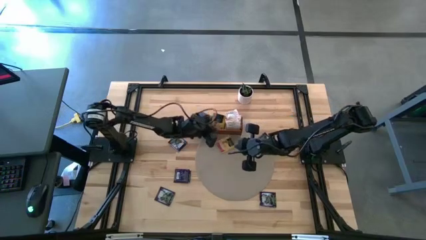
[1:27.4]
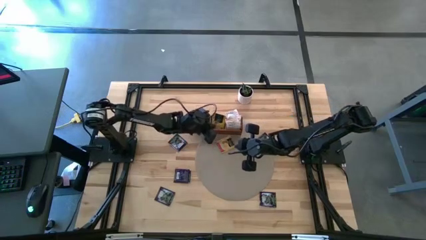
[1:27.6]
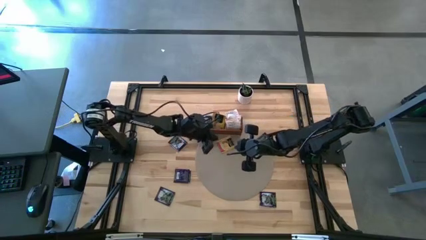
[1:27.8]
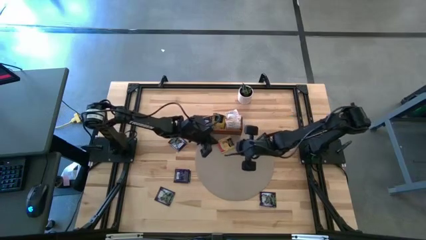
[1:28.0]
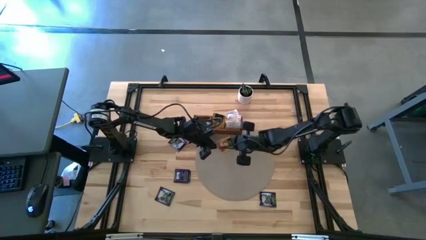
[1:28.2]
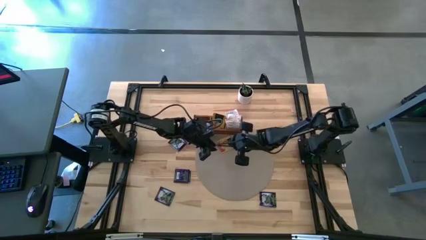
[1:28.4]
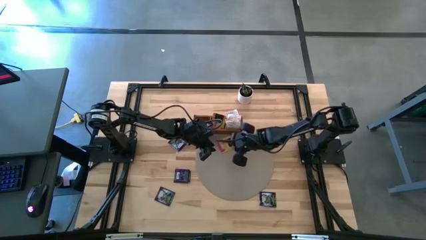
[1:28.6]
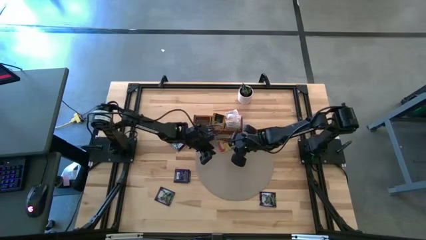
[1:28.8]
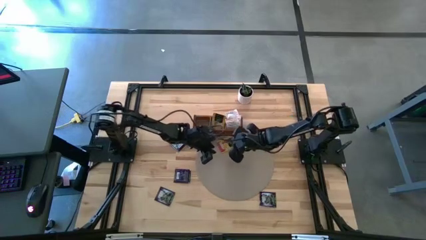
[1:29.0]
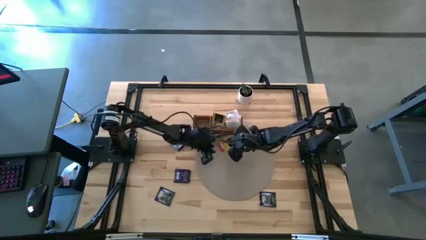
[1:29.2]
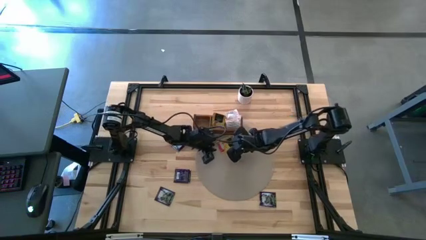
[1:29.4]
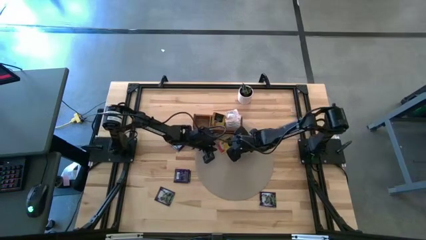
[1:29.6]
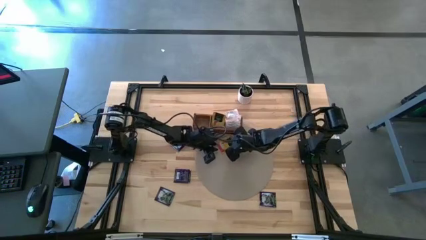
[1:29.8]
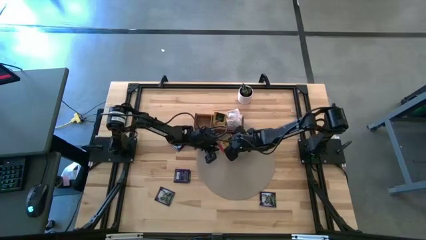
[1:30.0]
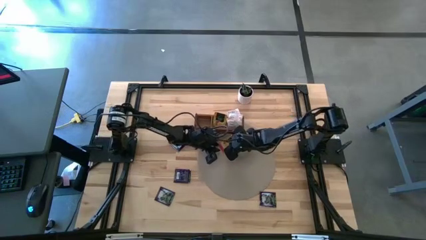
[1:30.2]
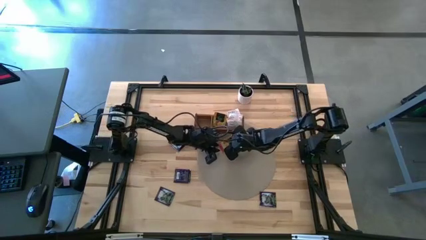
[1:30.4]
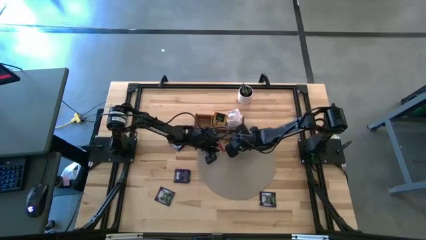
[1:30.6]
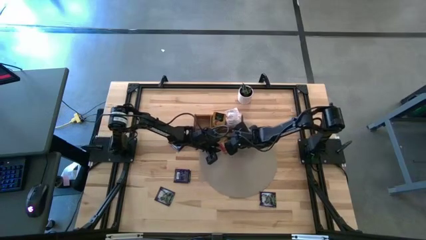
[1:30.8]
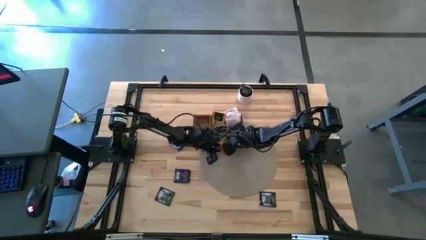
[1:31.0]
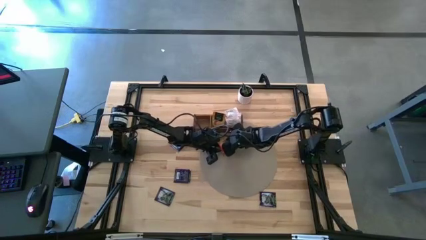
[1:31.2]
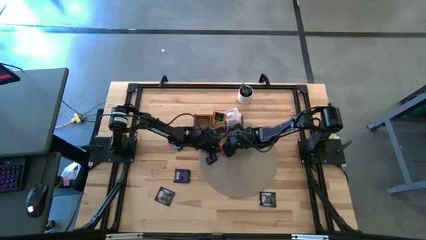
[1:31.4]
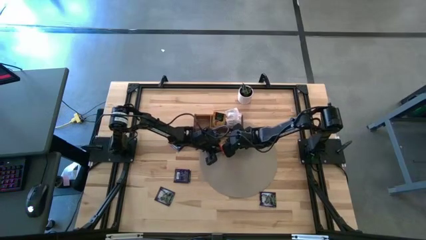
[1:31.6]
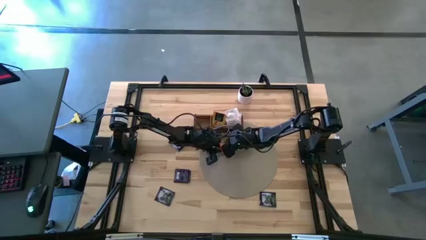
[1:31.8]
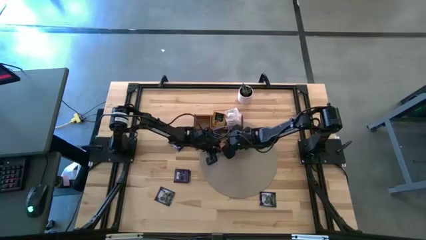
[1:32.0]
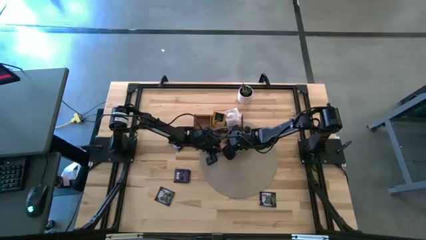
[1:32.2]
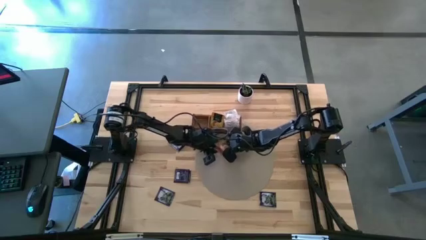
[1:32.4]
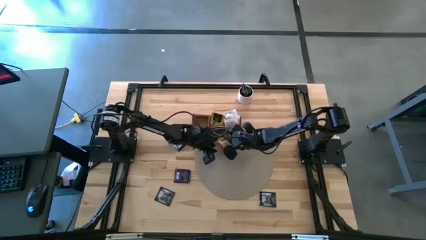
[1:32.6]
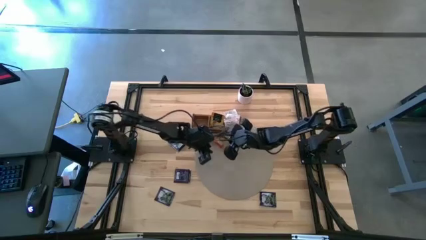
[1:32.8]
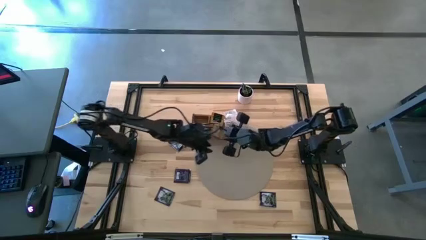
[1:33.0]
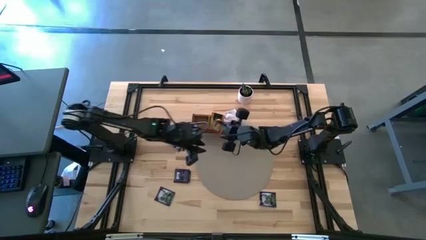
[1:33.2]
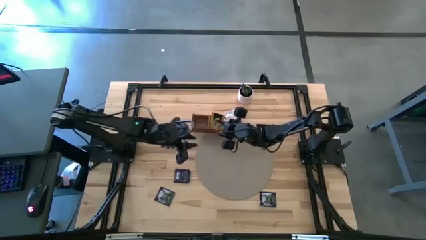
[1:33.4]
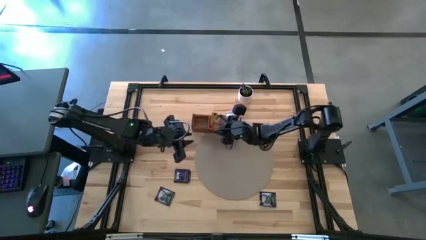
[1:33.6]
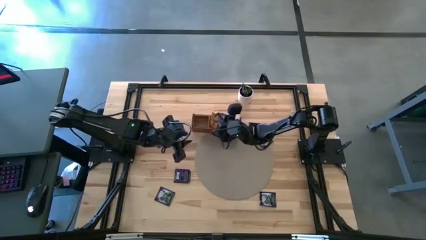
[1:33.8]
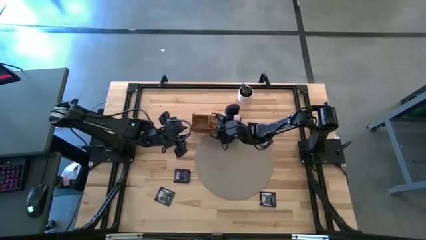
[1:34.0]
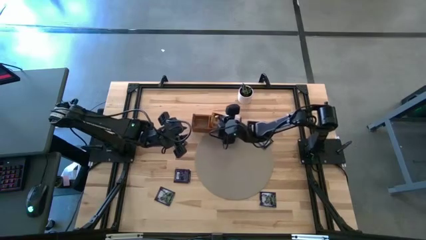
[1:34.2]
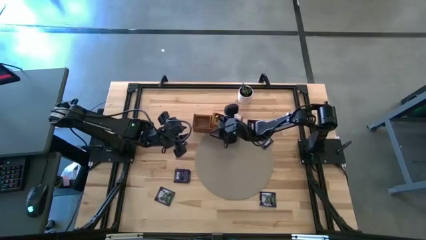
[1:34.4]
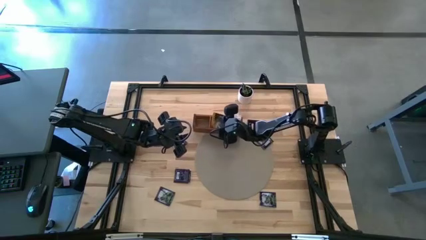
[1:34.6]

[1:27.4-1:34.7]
Task: Pick & Place Tea
Put the yellow tea bag into the middle section of the wooden organizer

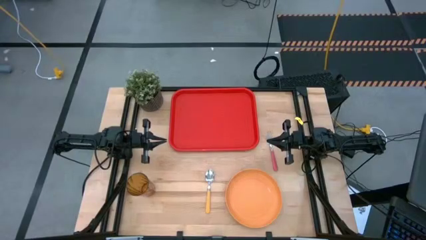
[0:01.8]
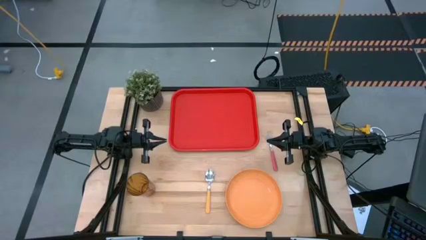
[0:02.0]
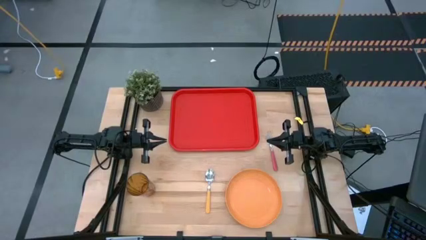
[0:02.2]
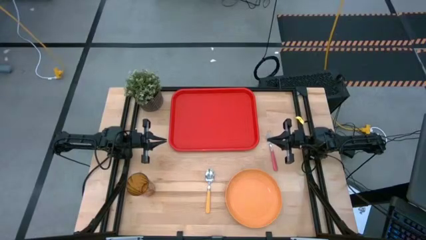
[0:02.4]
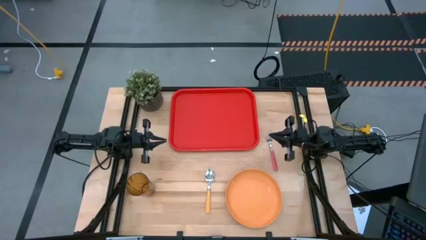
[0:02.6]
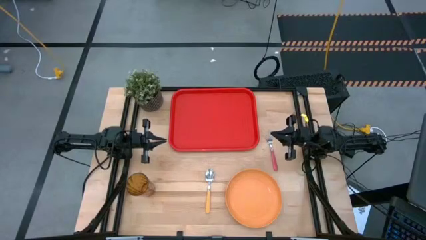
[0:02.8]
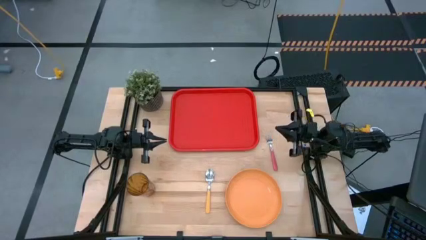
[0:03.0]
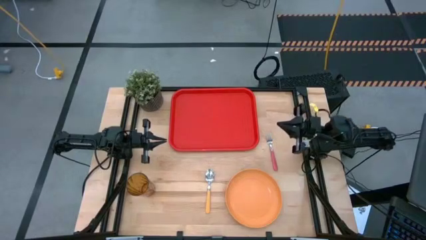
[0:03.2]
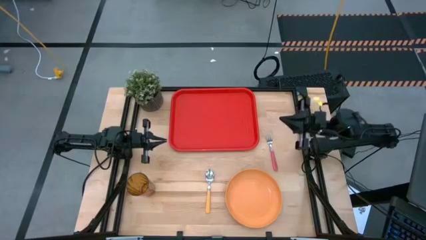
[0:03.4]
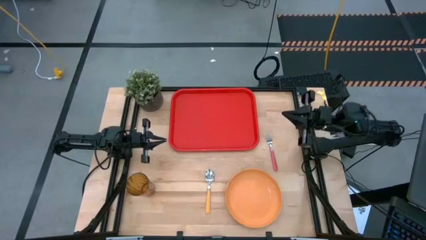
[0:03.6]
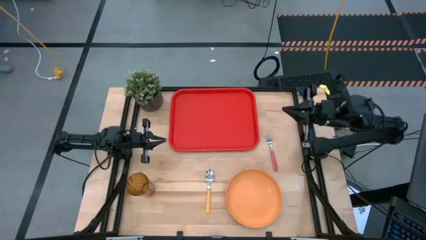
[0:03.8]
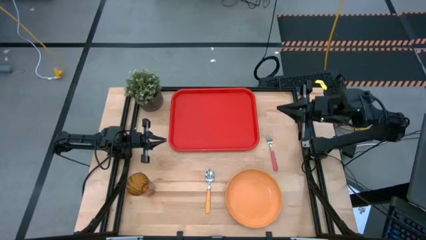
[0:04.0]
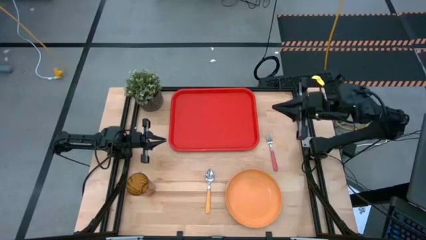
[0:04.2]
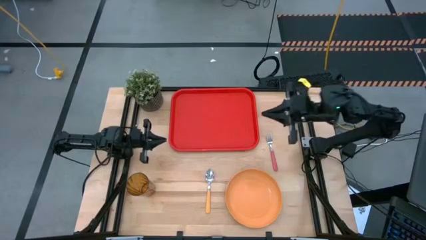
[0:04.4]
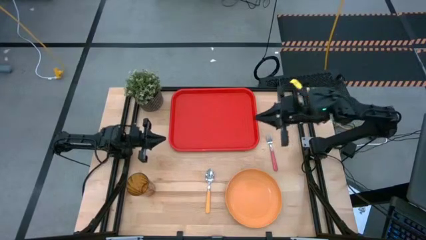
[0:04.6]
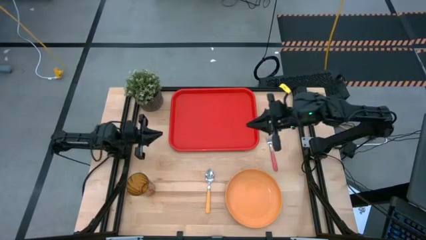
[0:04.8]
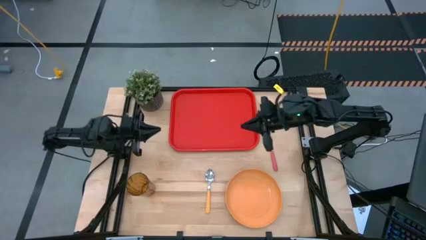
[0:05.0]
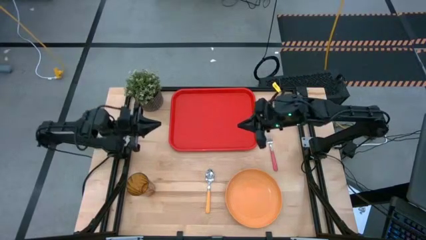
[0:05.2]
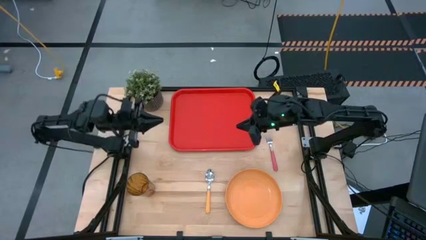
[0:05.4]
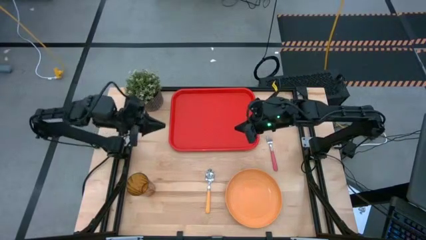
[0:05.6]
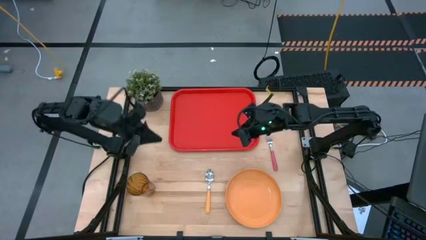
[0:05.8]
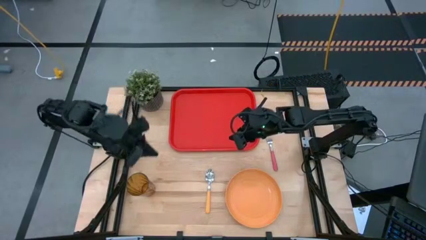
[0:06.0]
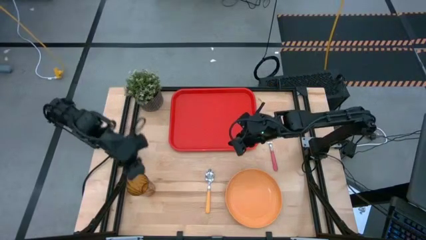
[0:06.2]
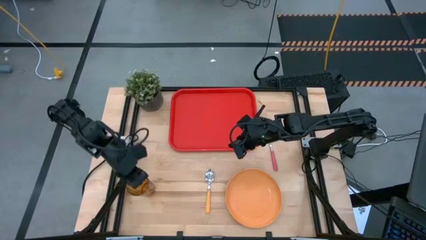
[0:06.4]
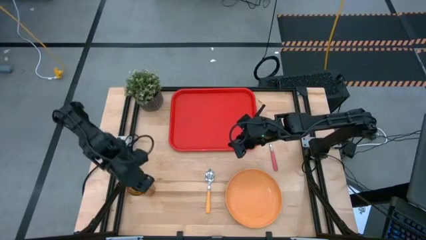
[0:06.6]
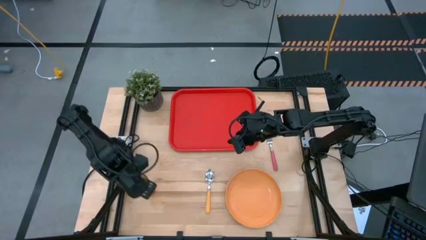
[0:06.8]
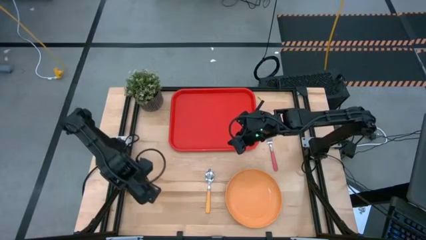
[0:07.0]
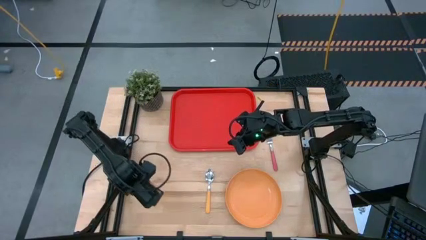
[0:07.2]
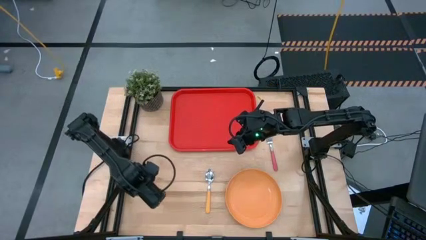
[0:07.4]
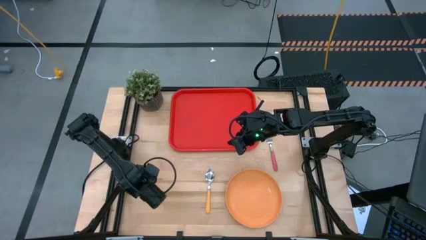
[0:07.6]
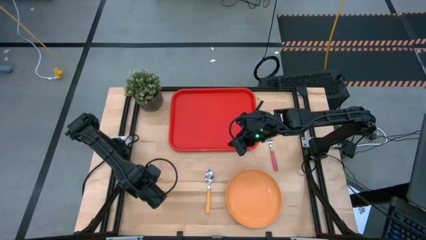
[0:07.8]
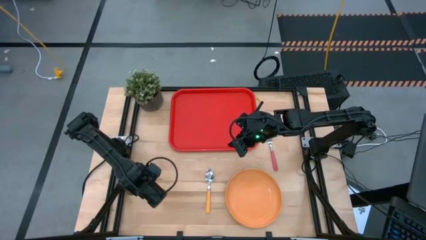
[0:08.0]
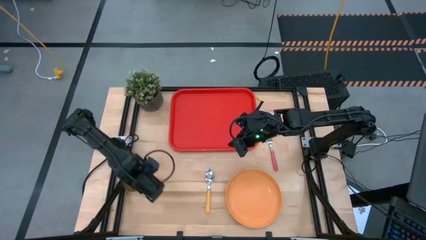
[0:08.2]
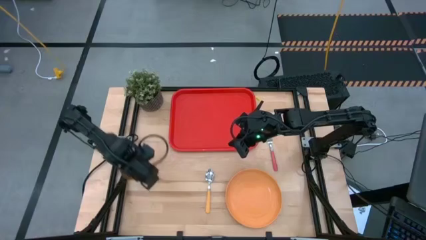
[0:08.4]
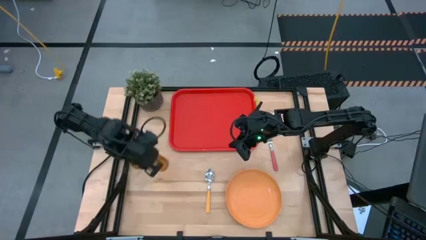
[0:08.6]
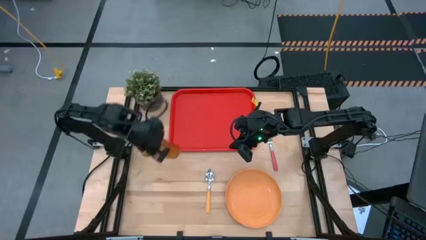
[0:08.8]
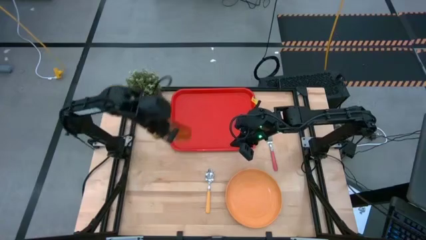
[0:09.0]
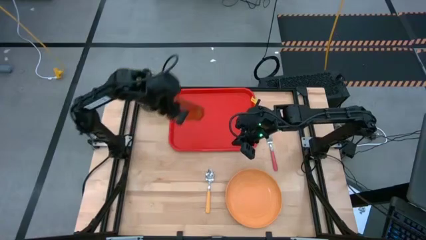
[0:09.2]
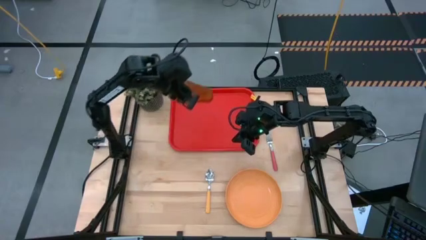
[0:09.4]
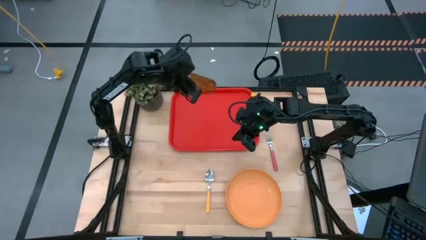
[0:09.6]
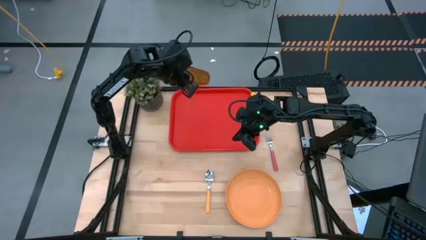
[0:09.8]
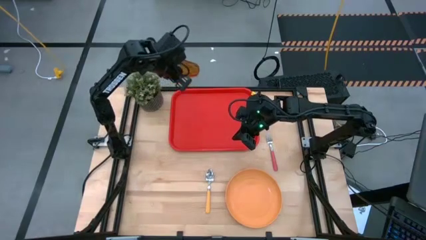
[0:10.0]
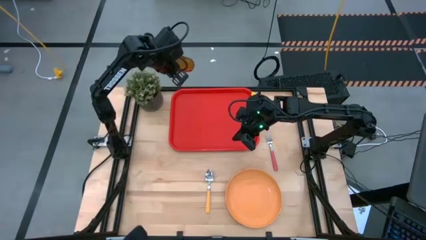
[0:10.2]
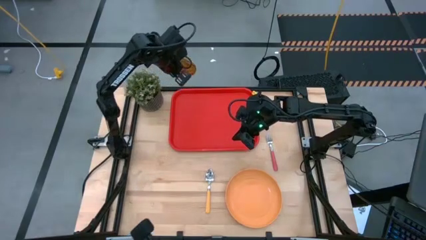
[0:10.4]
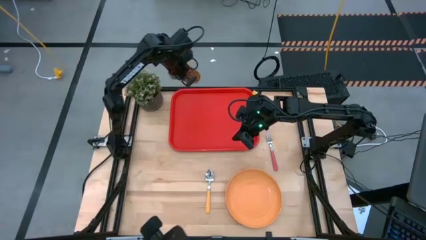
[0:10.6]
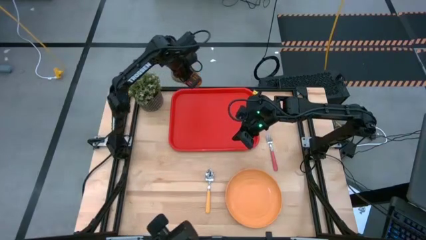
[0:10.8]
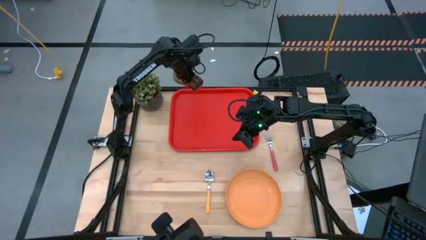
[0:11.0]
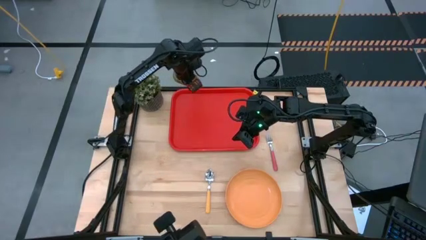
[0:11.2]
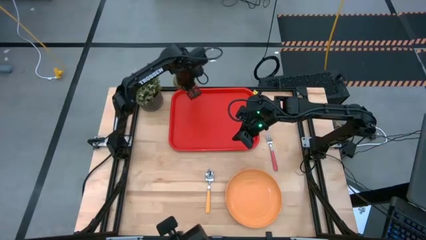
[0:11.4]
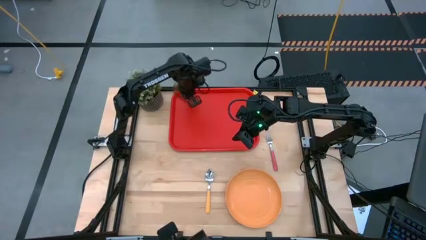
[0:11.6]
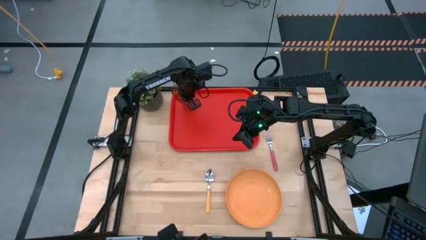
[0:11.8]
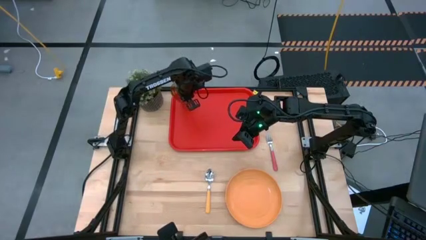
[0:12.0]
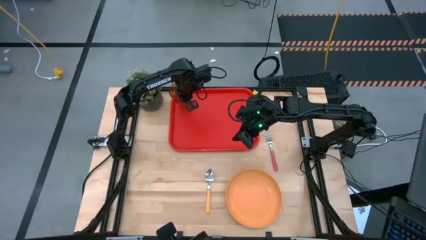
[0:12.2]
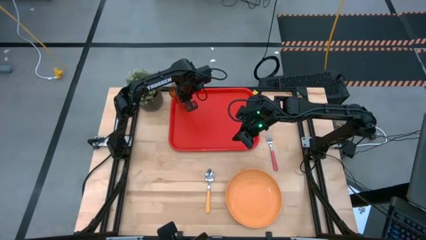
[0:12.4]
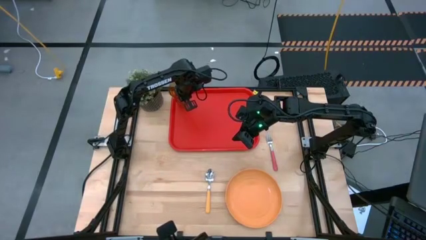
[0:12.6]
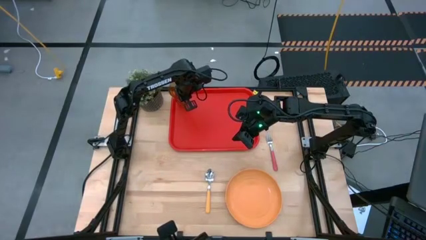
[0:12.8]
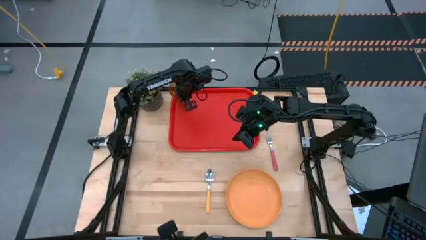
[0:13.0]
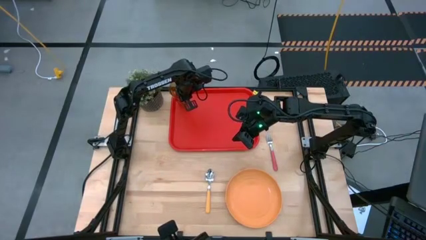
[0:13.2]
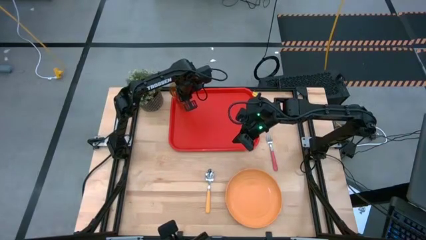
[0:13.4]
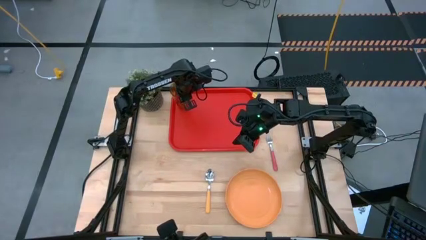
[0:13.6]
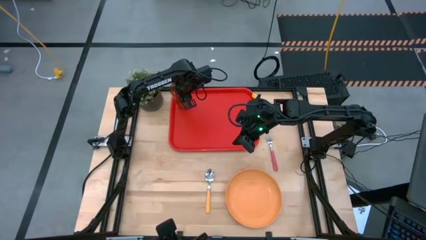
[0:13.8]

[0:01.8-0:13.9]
Task: Pick and place plate/cup/fork/spoon on tray
Put the orange cup on the red tray
